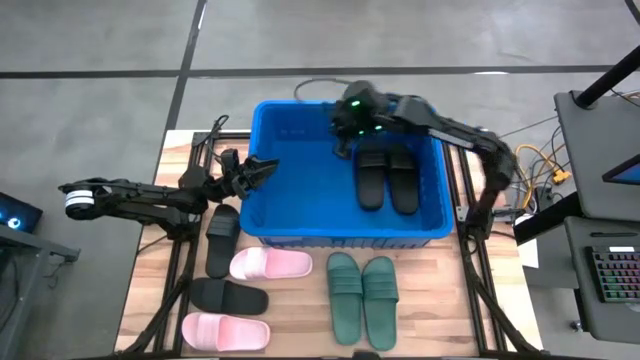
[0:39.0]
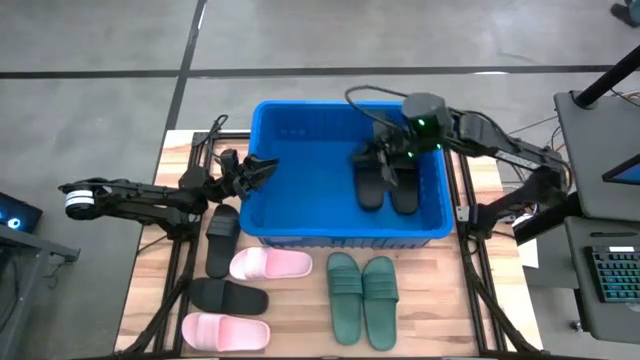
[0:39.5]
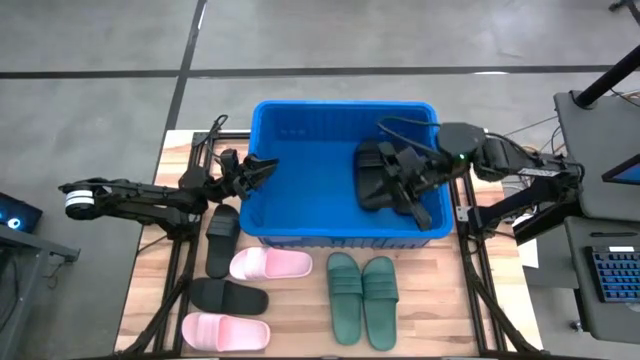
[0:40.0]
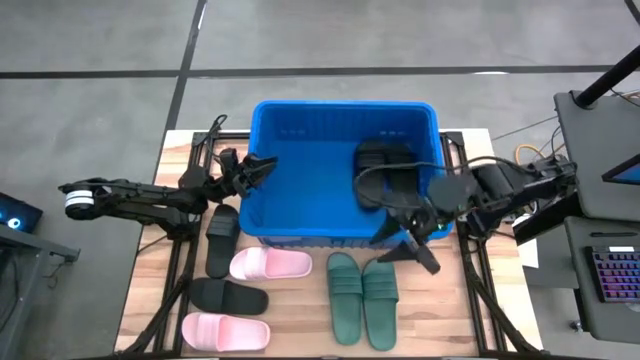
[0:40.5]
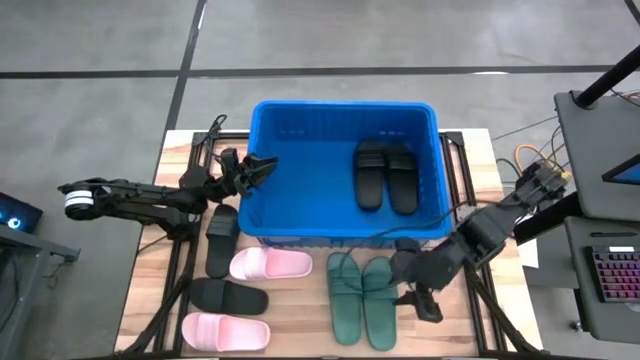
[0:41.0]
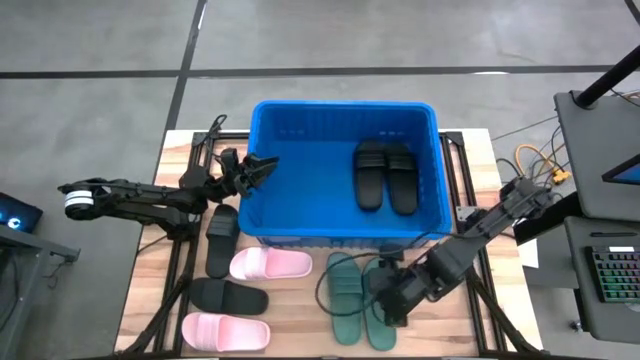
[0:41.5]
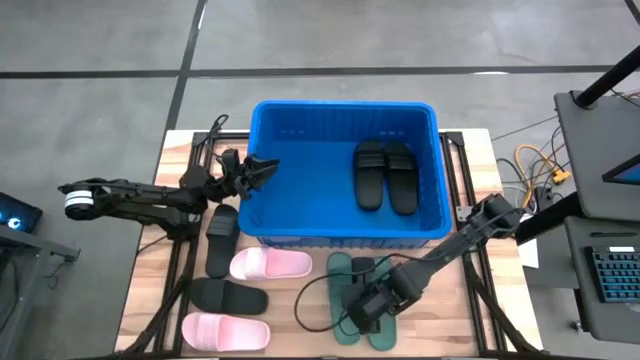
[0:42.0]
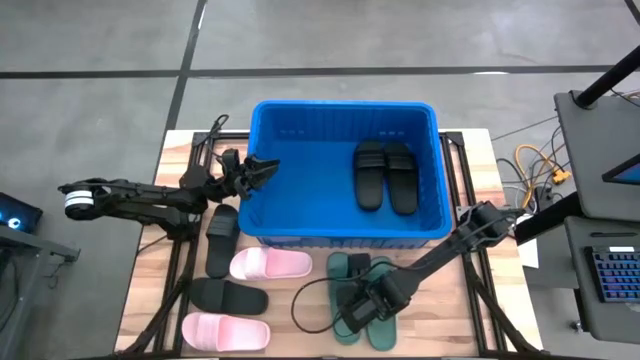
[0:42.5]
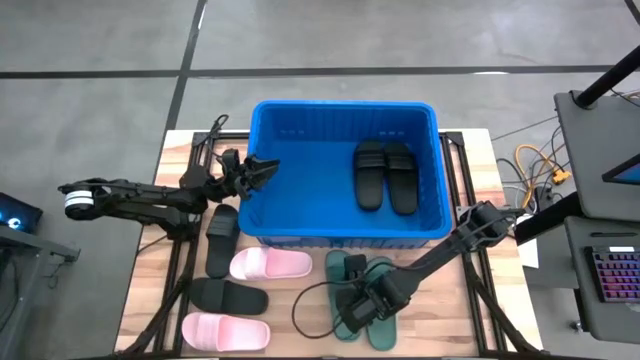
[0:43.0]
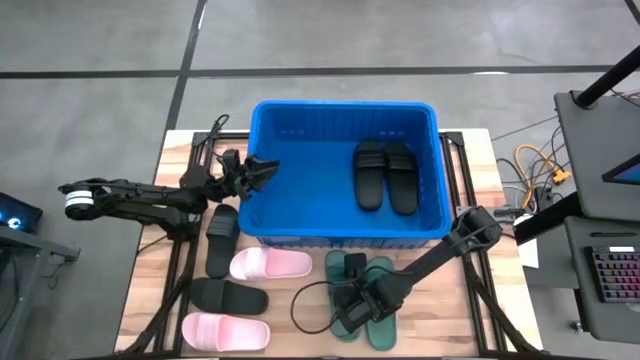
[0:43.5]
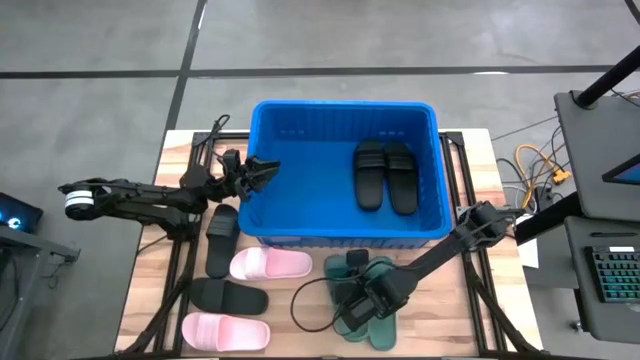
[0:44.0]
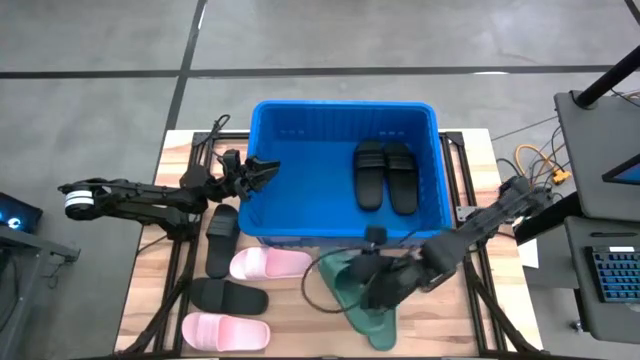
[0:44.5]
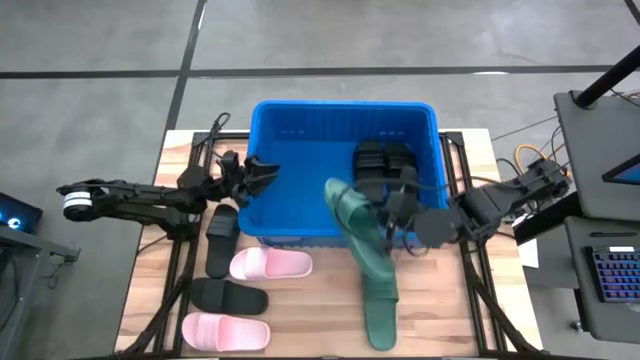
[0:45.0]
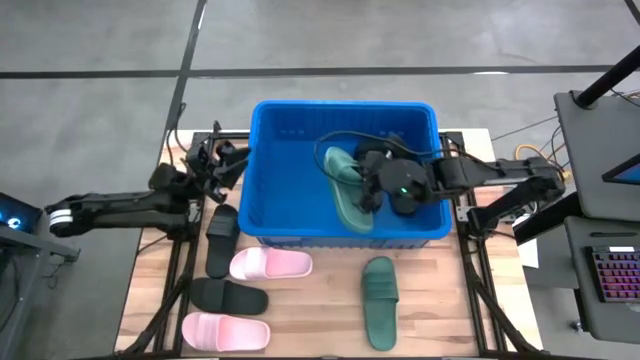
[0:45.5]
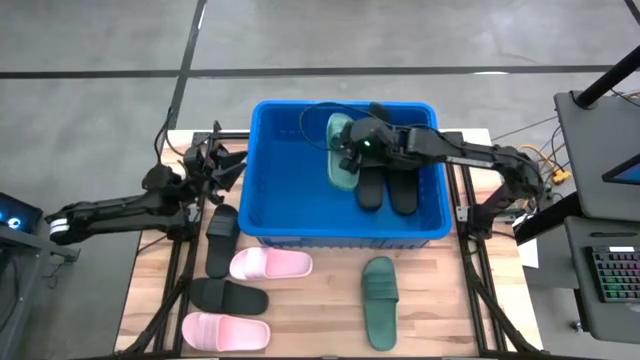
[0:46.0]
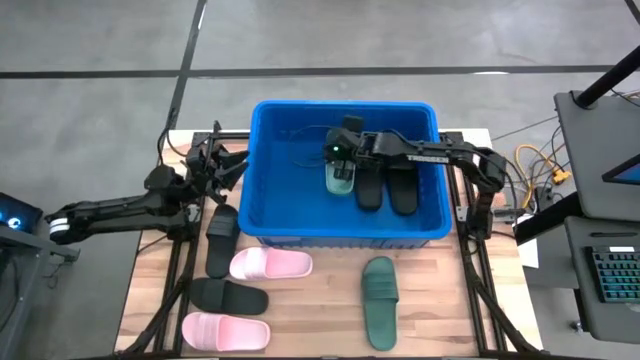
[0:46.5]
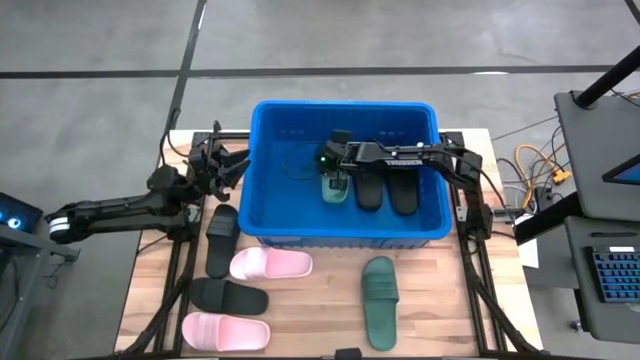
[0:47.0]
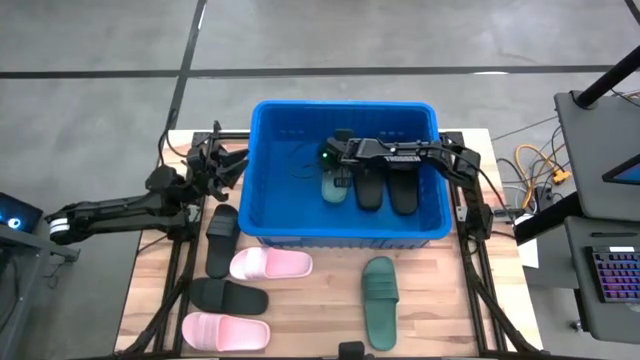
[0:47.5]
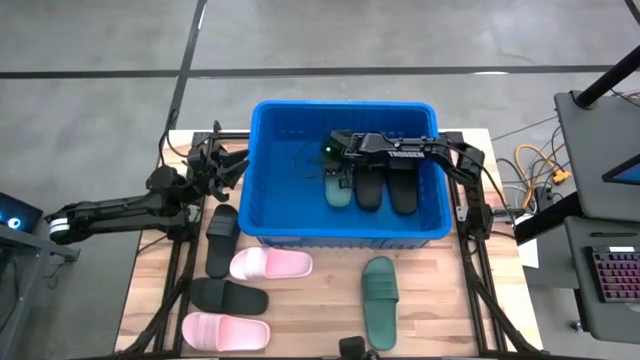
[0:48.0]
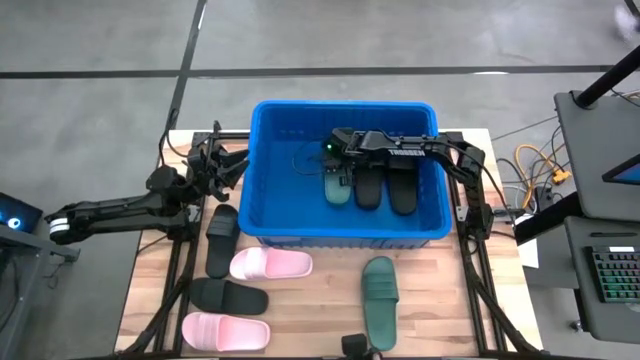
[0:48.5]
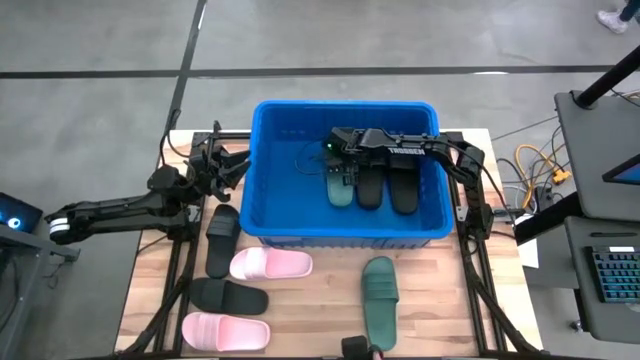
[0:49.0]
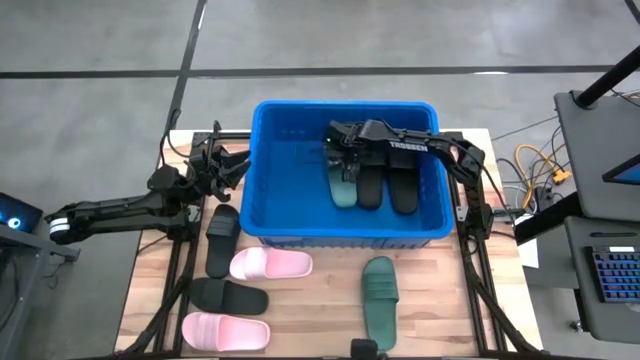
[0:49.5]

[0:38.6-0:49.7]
Task: Pick and place slides into bin
Put the green slide into the blue container

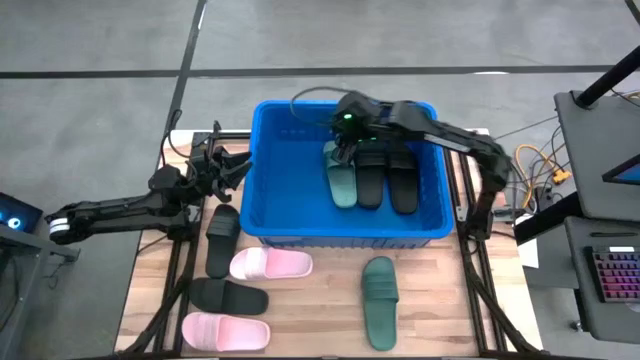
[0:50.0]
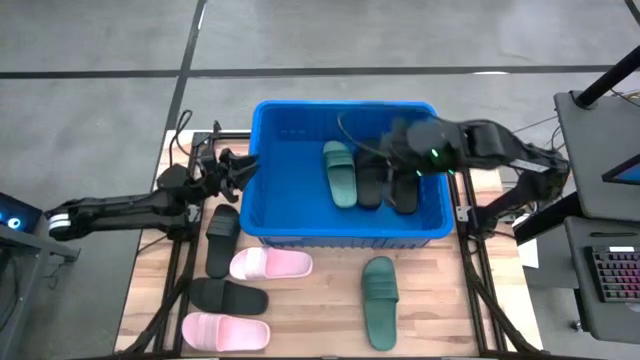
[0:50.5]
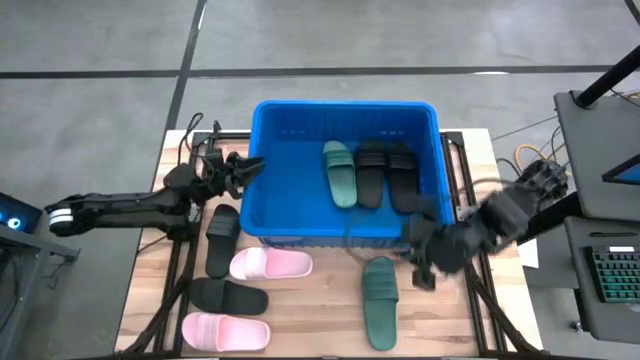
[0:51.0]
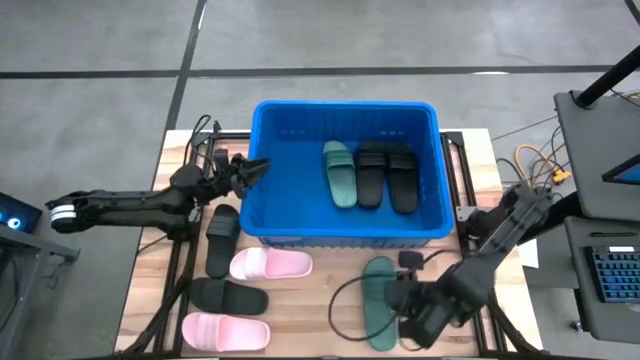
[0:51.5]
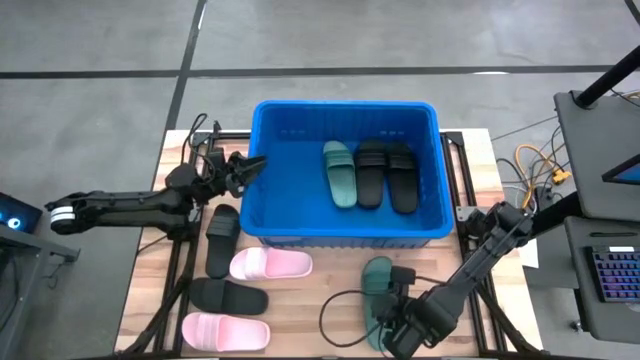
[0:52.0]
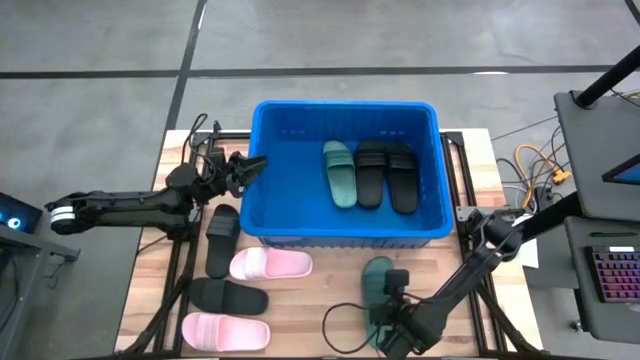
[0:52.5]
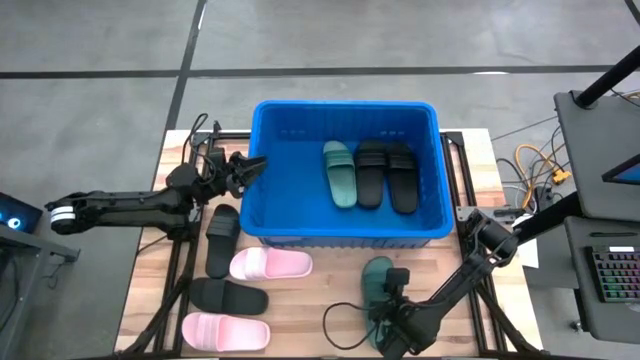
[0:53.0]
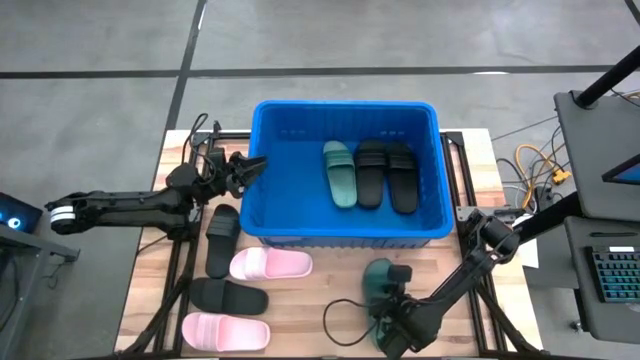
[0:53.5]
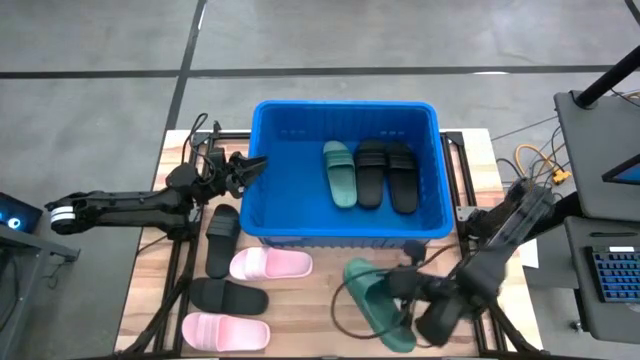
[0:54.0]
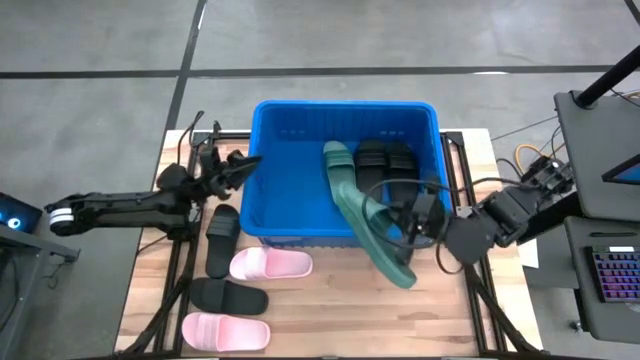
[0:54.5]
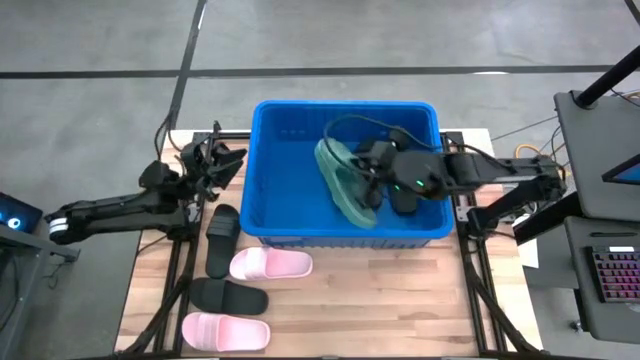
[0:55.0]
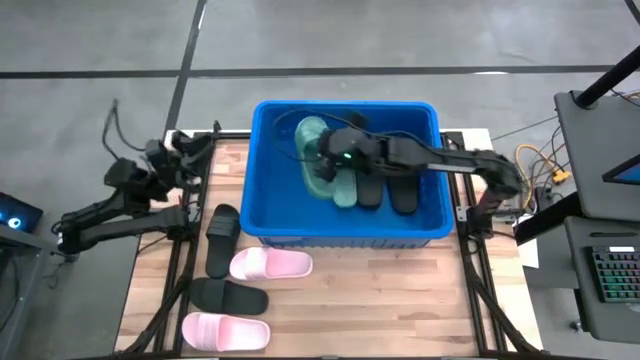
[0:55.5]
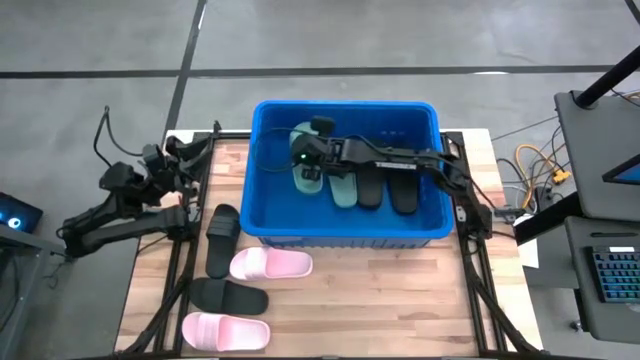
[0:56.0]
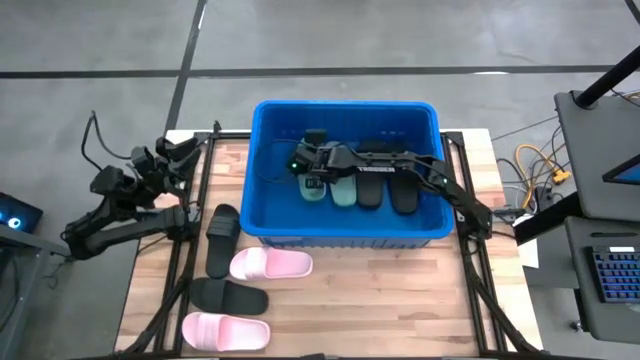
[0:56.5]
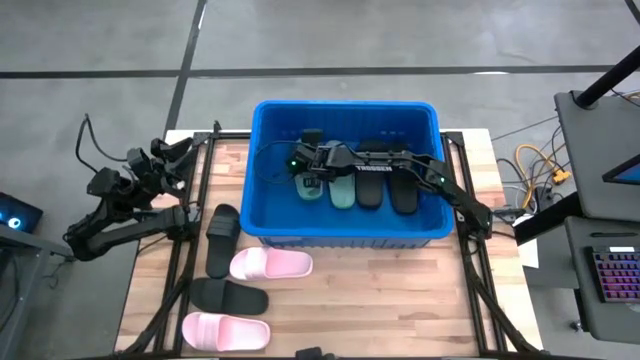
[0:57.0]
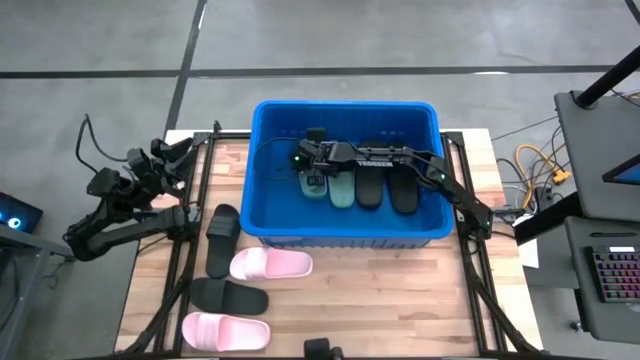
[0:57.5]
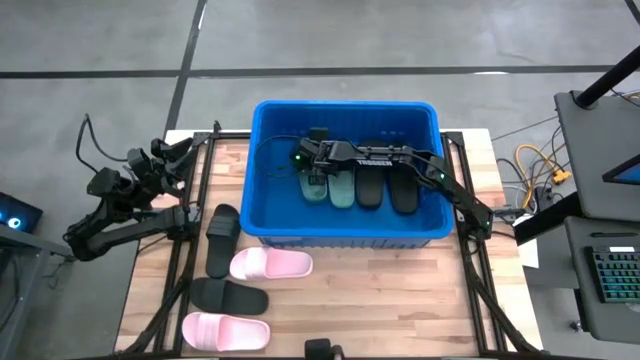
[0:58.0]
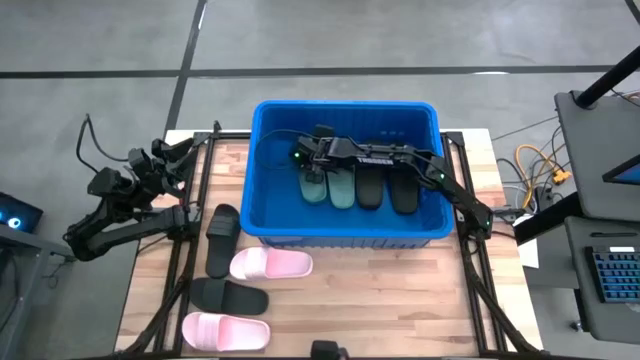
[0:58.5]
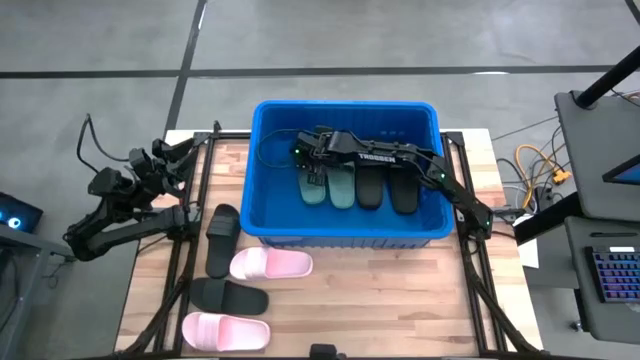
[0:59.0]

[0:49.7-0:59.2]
Put the green slide into the blue container
